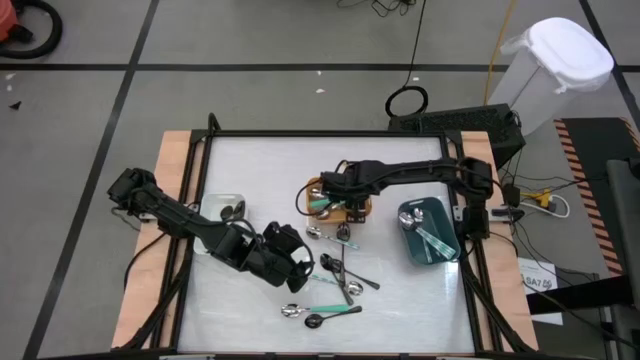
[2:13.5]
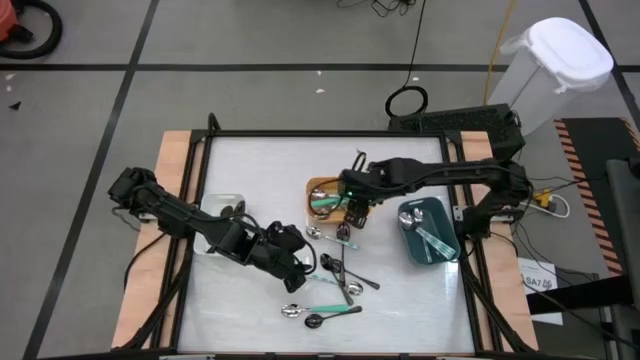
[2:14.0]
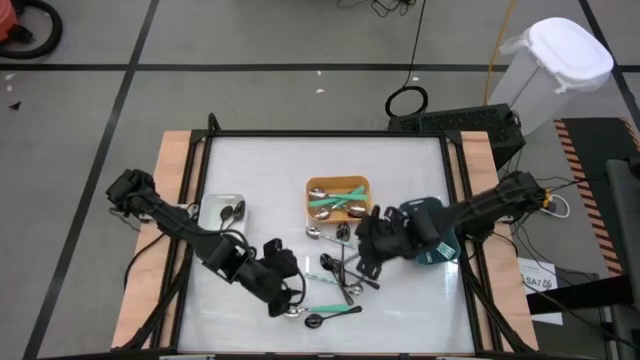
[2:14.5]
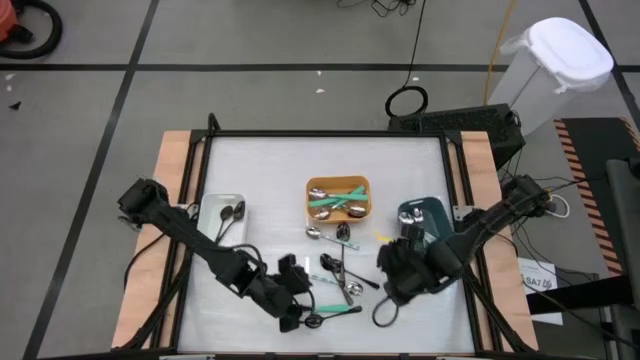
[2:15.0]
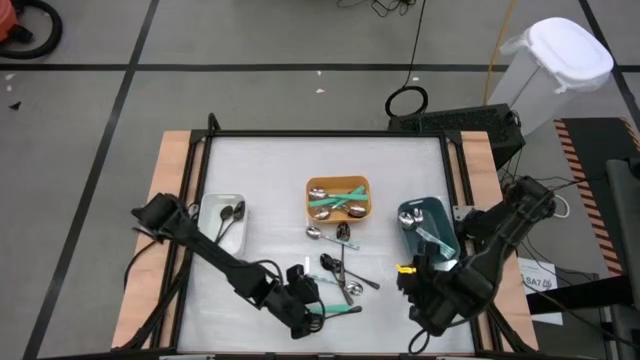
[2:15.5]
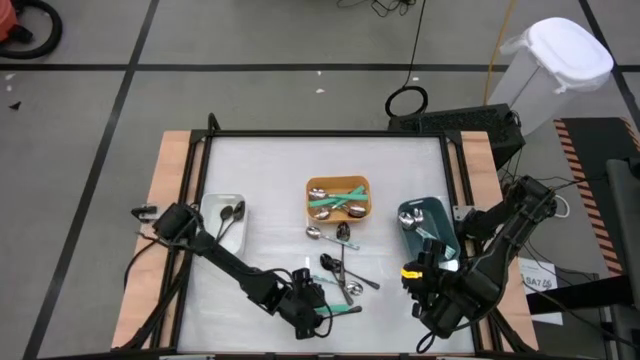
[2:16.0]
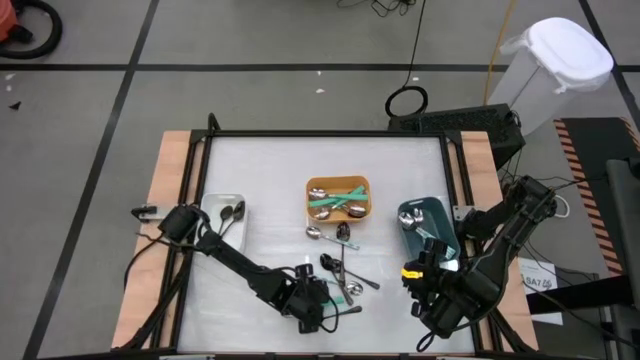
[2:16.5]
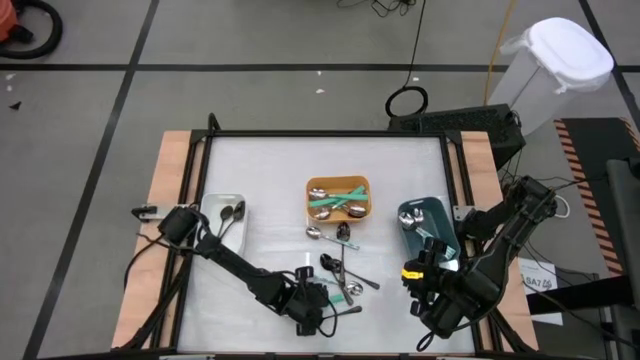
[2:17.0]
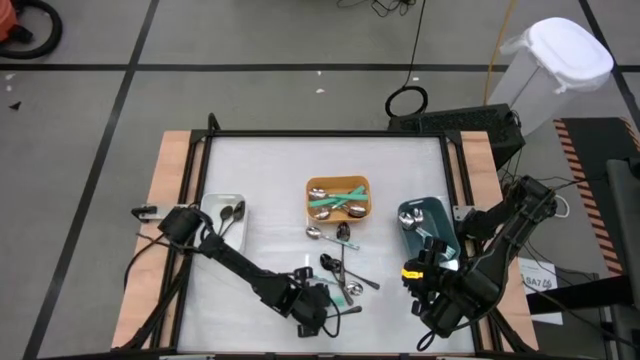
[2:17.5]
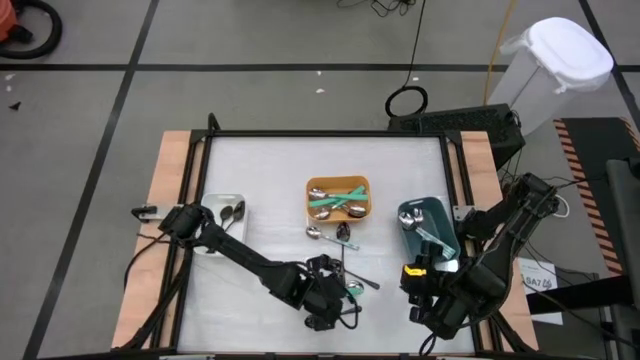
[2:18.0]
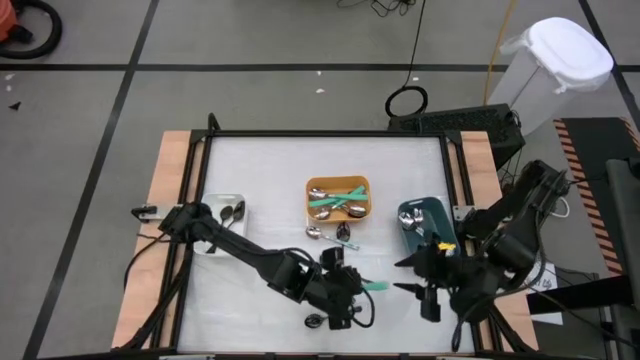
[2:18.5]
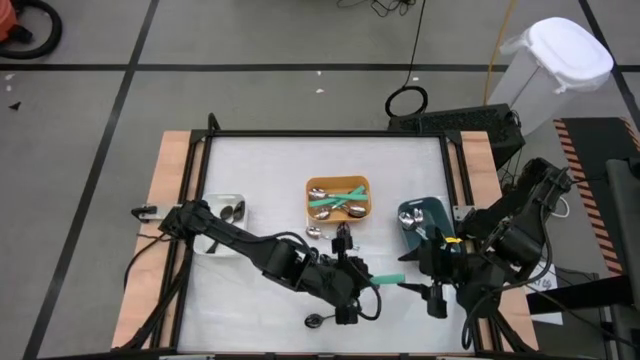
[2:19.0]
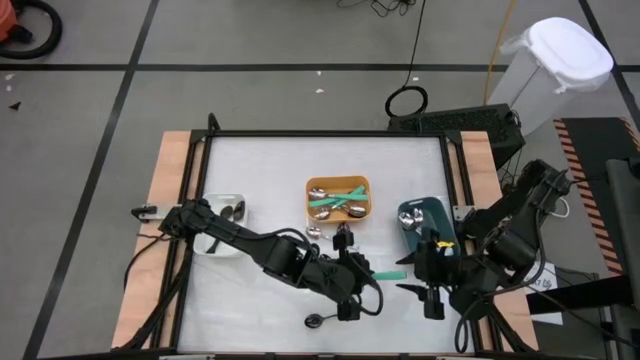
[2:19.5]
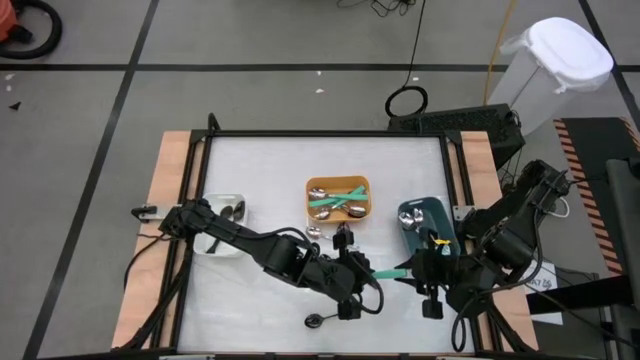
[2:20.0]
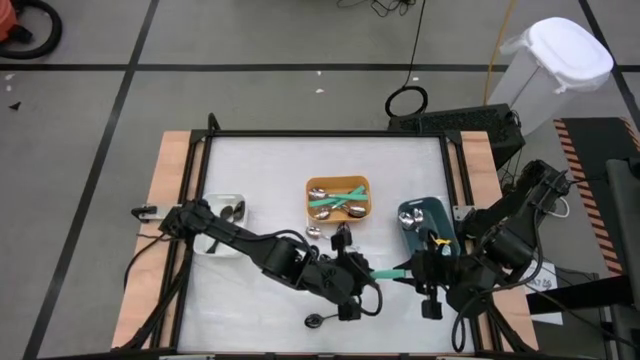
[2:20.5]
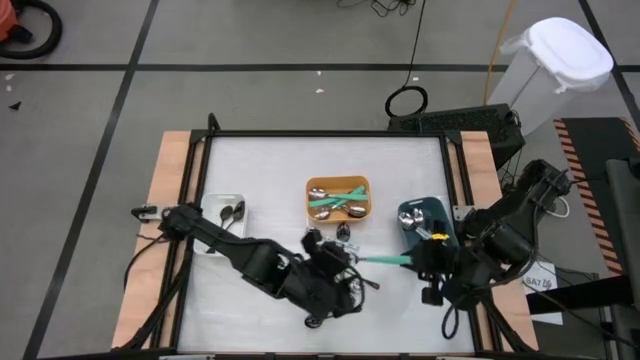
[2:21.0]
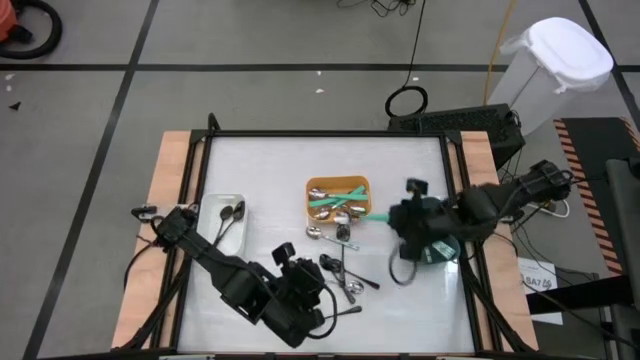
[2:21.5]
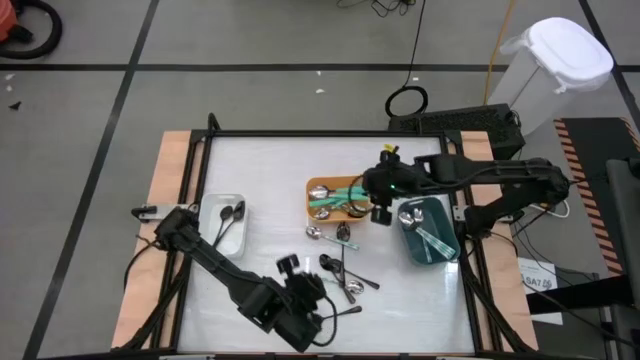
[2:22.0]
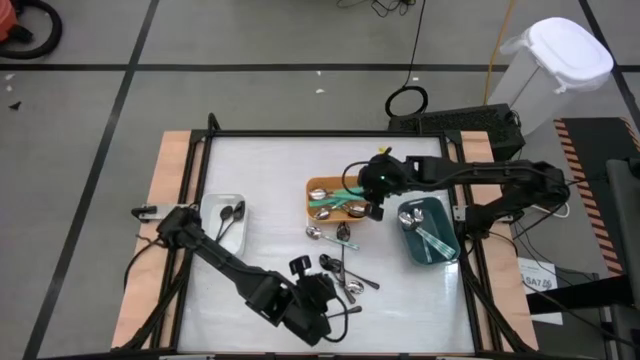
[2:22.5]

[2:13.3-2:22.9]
Task: Sort silverware by color (type)
Put the green spoon into the orange bin

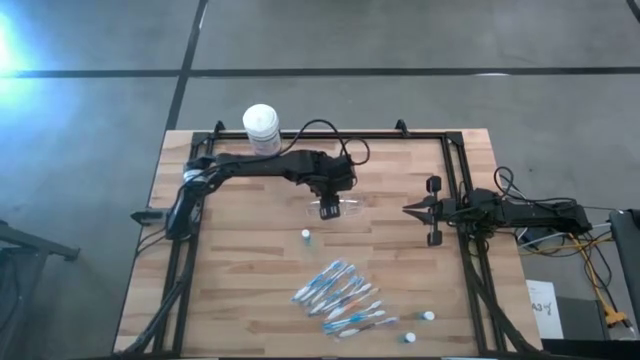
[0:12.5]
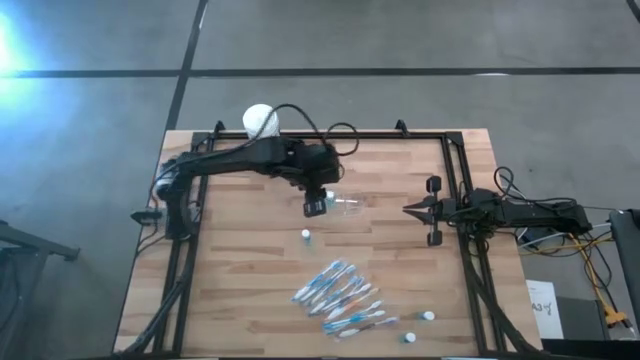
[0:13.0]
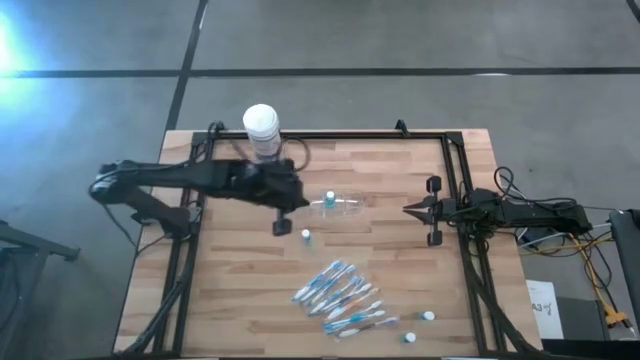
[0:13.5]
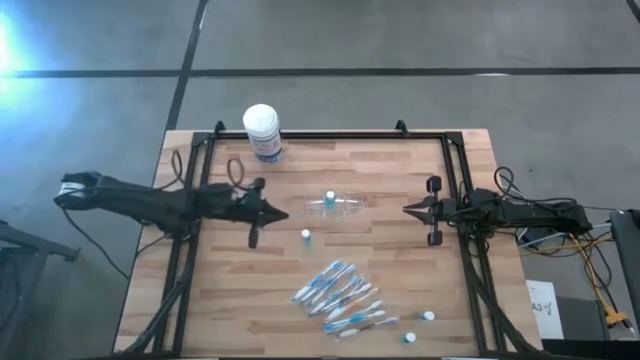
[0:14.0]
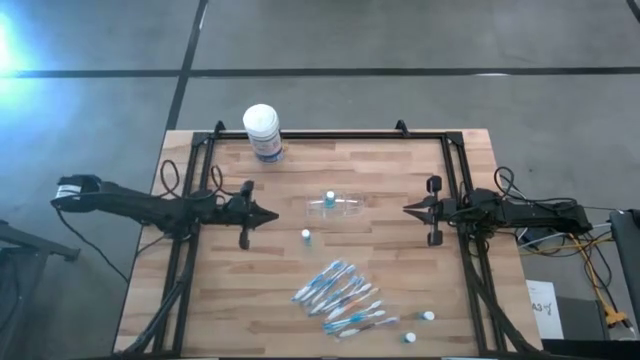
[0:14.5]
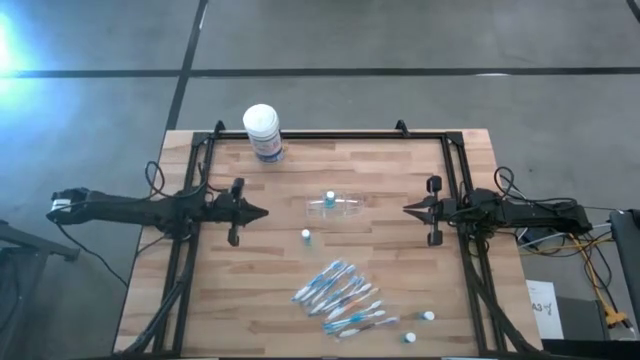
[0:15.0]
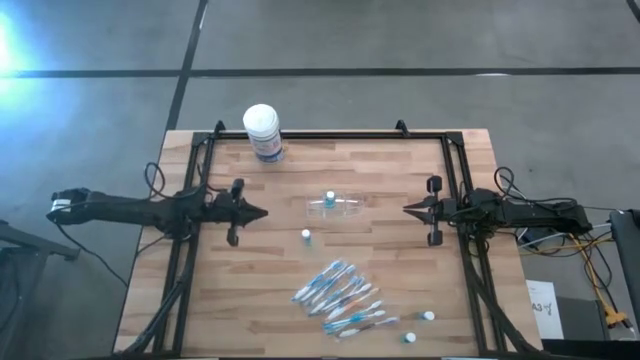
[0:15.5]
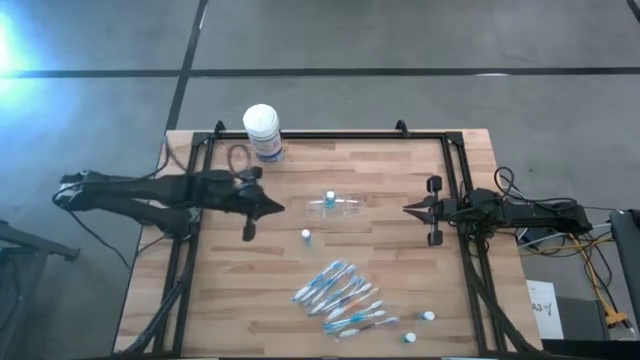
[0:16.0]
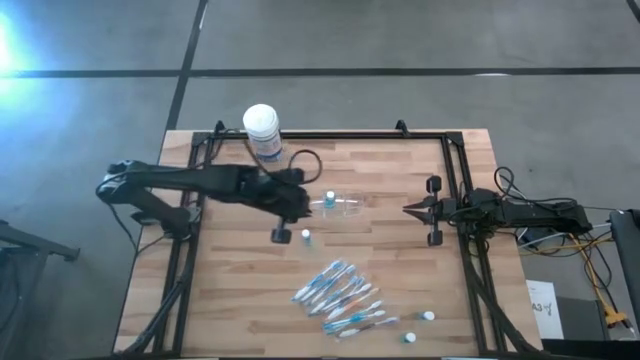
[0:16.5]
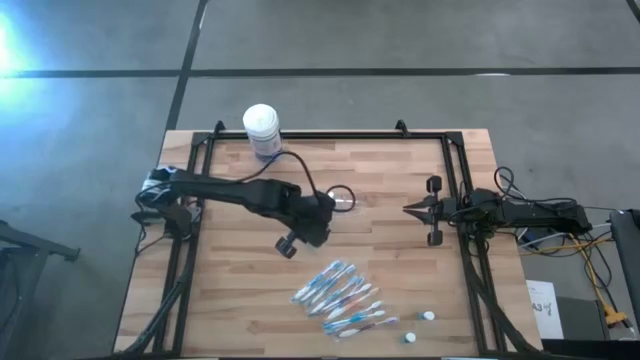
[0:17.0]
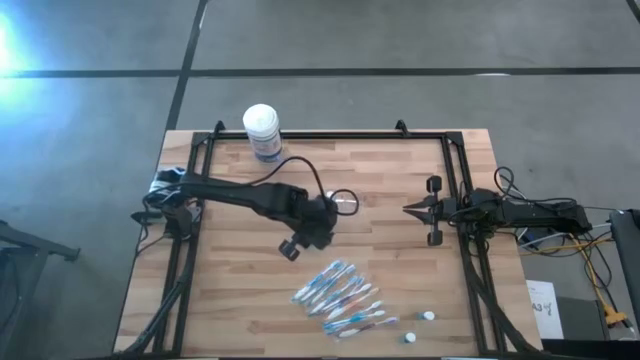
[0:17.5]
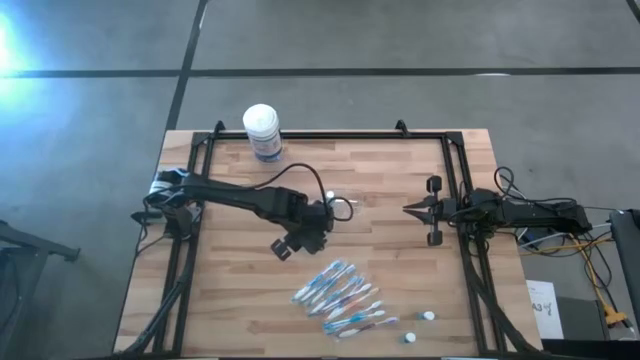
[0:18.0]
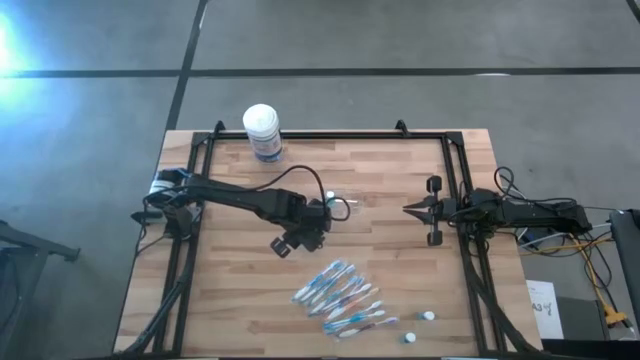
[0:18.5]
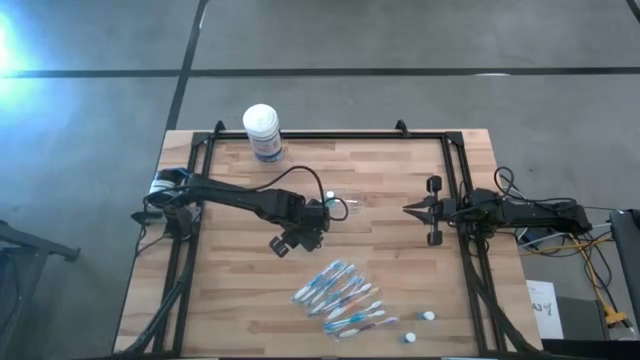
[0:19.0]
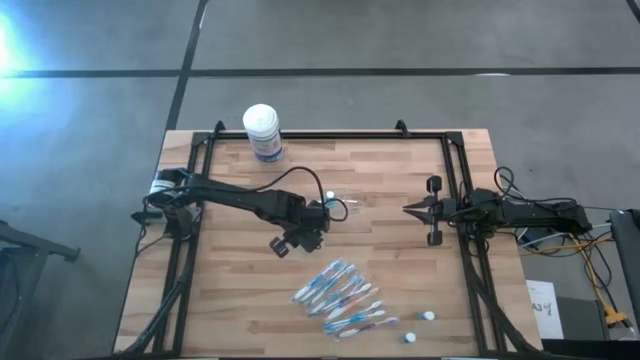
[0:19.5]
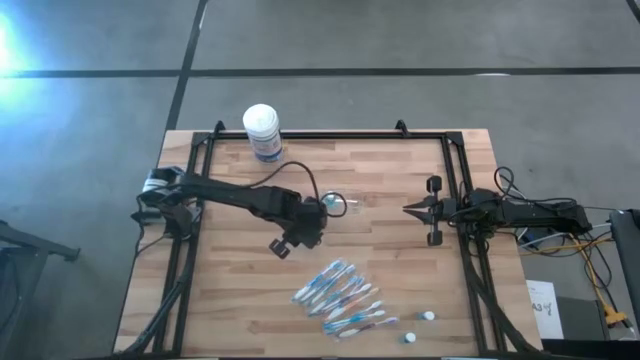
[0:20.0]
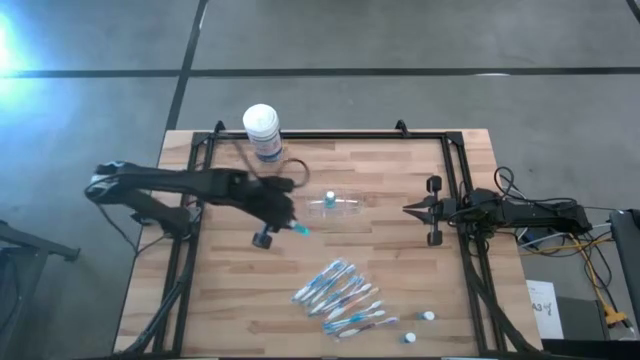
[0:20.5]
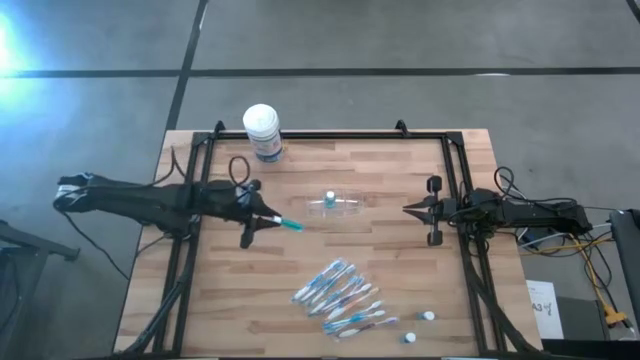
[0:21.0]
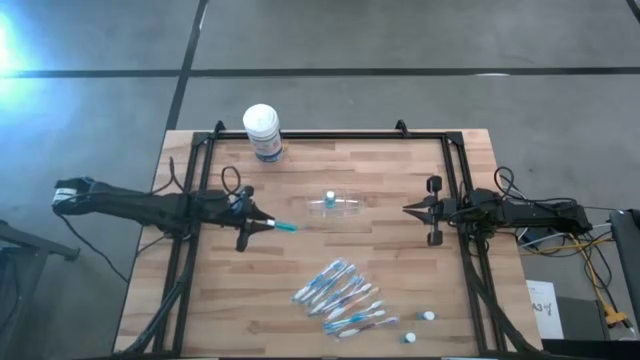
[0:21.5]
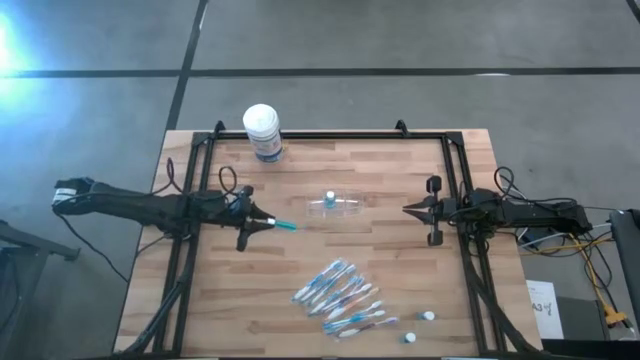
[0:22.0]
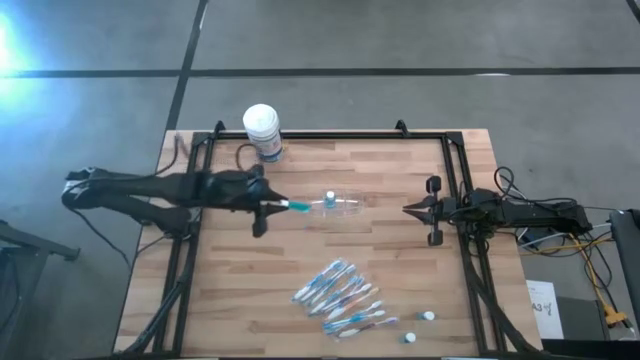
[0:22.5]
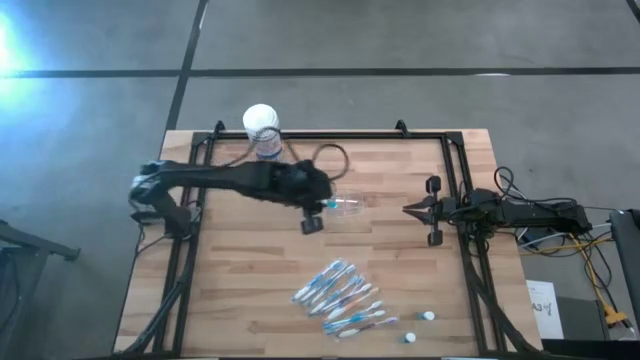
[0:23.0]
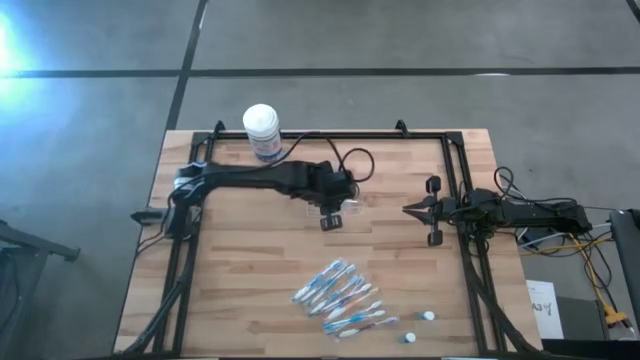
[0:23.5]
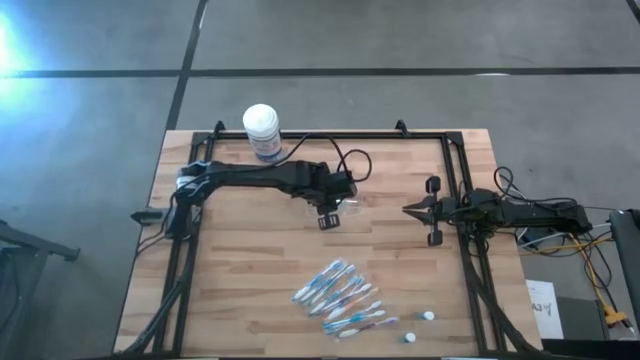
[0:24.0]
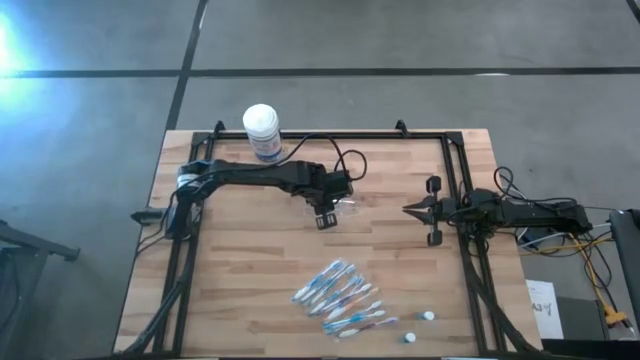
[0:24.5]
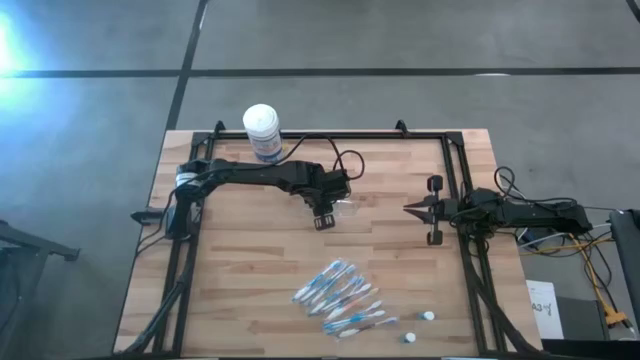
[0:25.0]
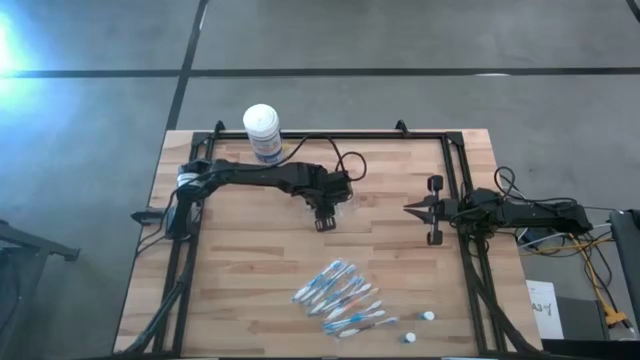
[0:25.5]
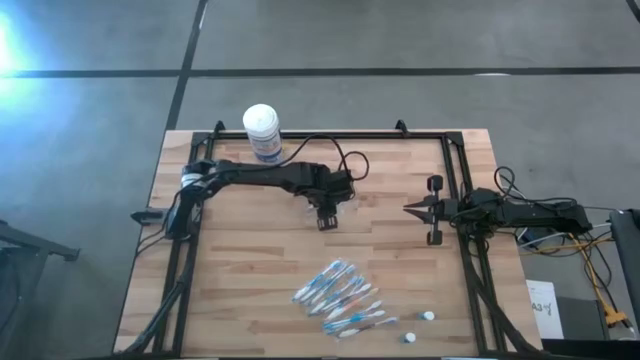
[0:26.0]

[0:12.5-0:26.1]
Task: Pick & Place toothbrushing station
Put the mouthwash into the transparent organizer
